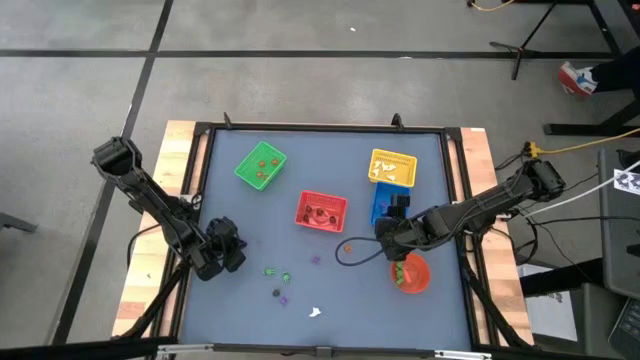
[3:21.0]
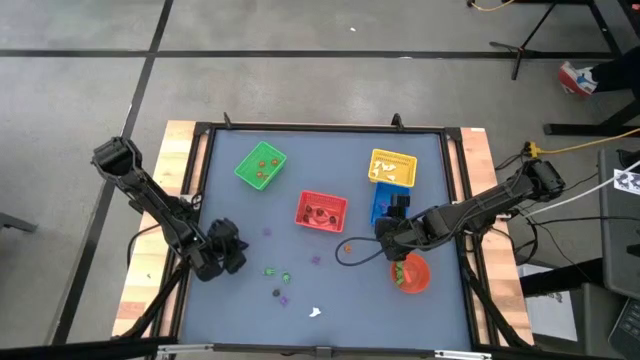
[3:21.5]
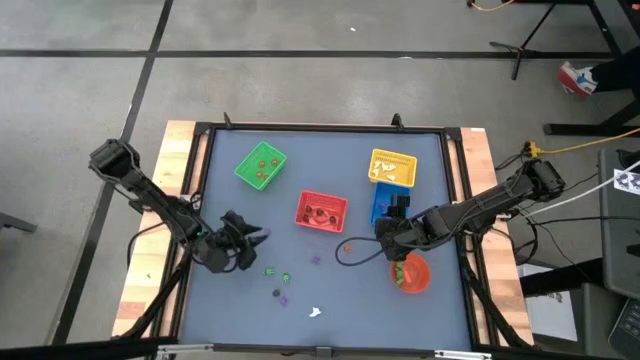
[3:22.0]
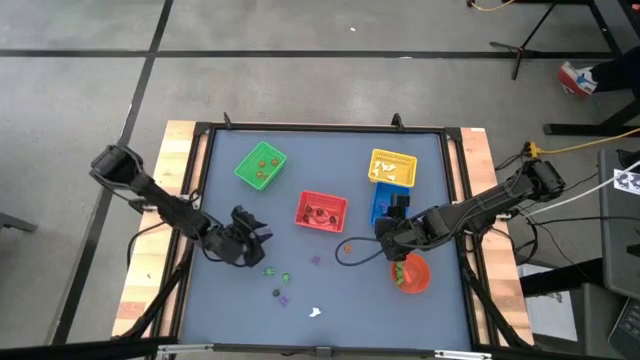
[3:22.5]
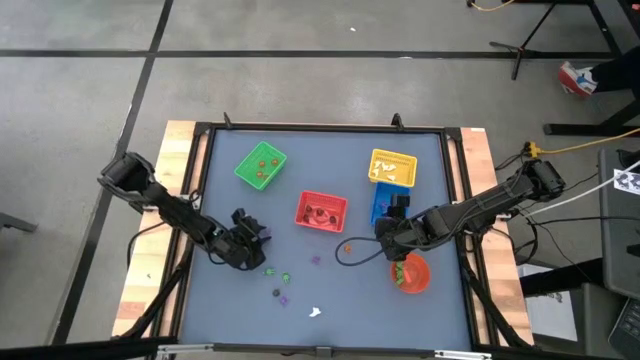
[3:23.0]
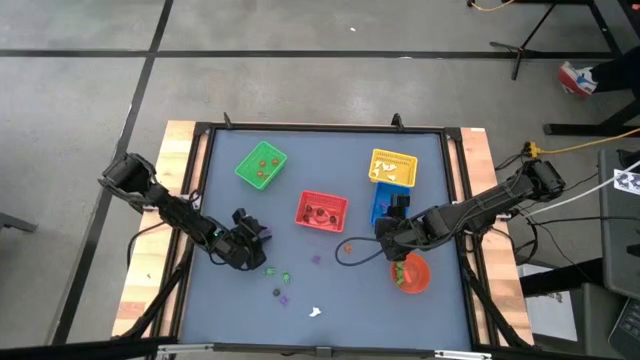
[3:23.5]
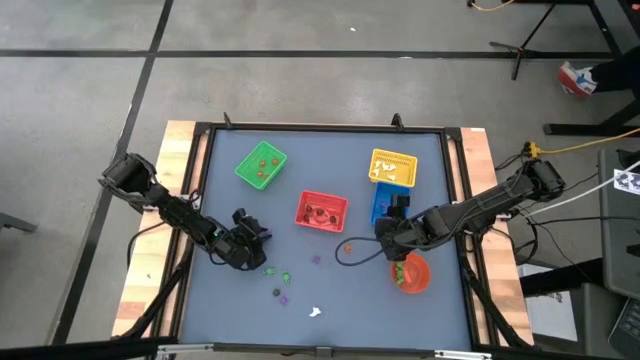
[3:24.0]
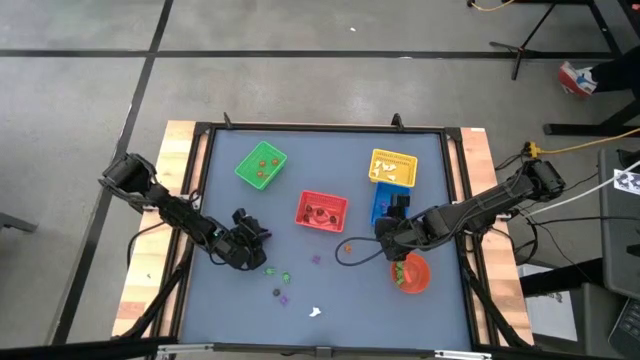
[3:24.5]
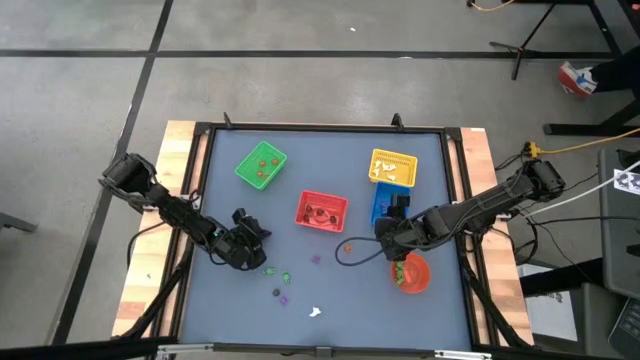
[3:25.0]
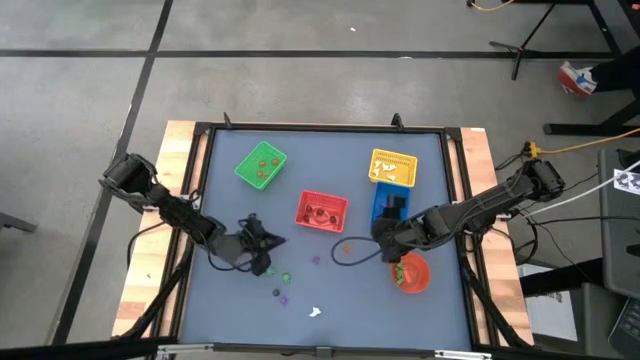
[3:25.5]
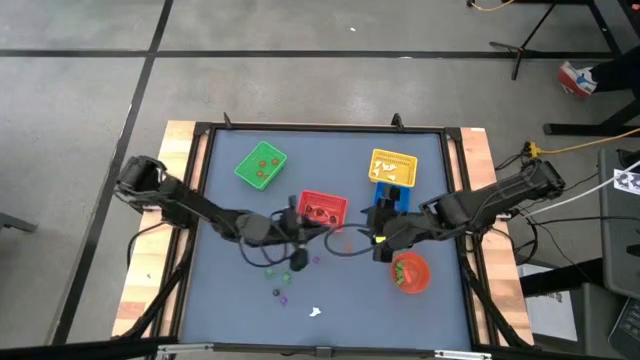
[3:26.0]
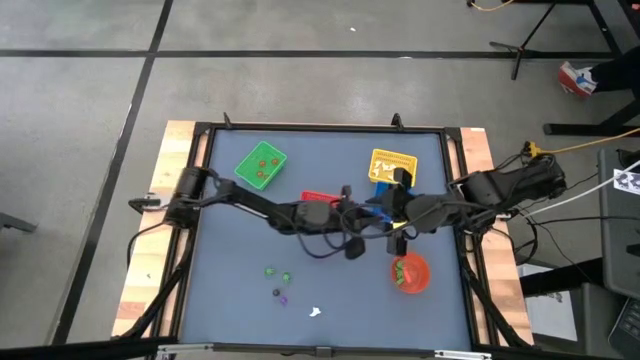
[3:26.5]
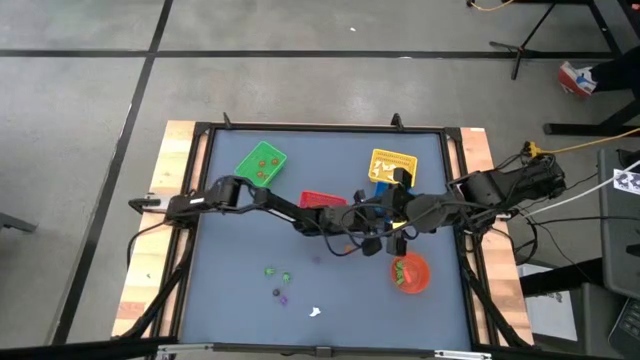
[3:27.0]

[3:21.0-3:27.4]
Task: Sort Halloween decoration
Put the violet spider toy into the blue bin

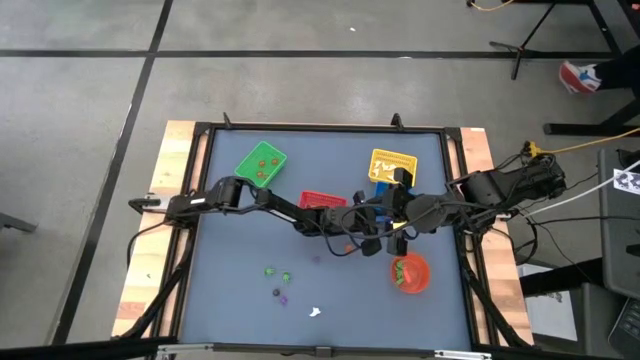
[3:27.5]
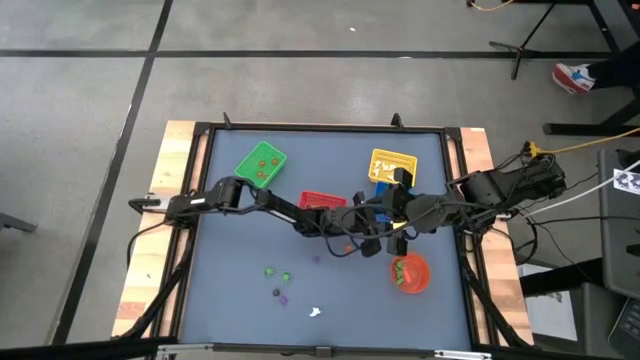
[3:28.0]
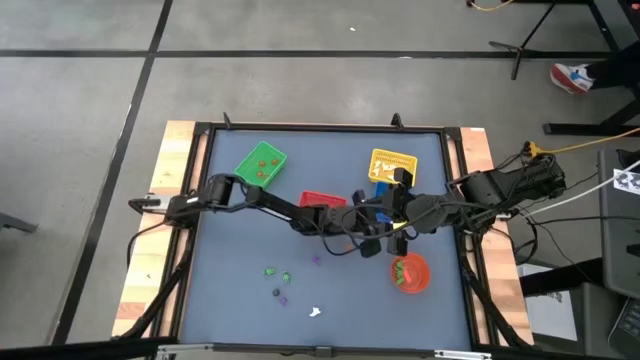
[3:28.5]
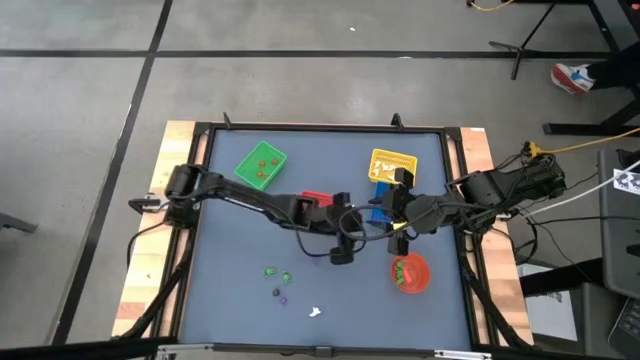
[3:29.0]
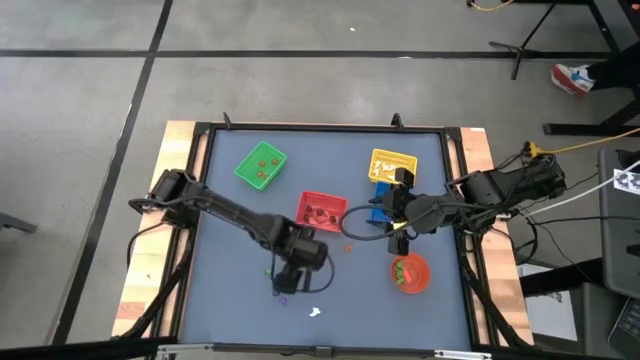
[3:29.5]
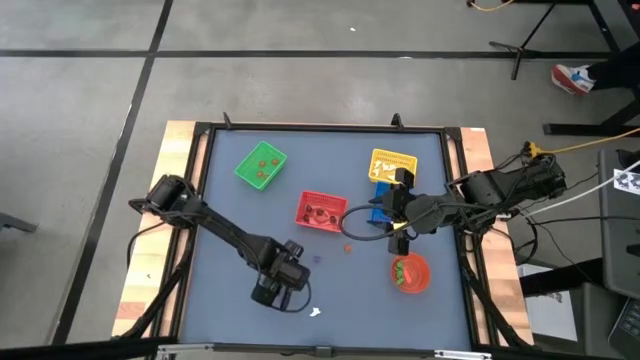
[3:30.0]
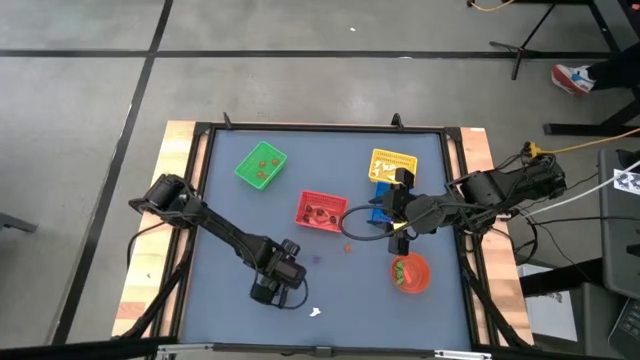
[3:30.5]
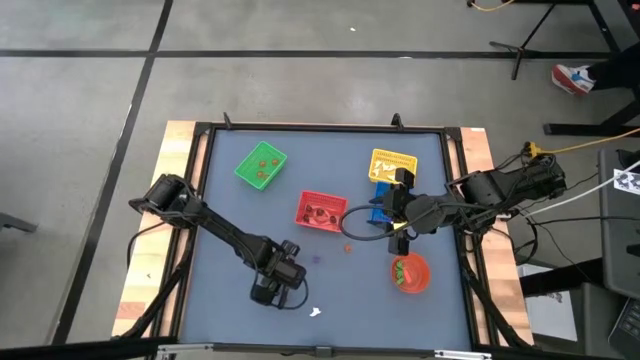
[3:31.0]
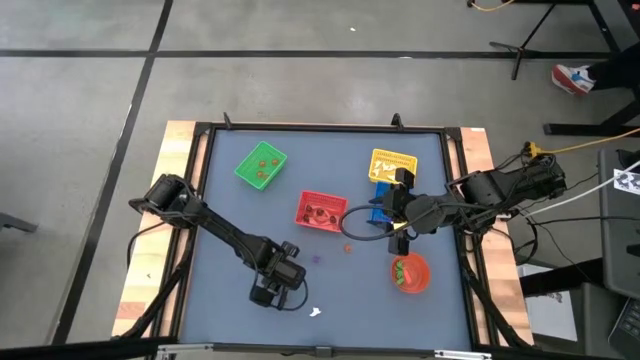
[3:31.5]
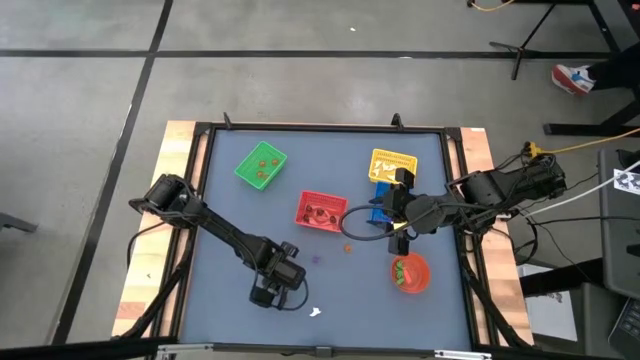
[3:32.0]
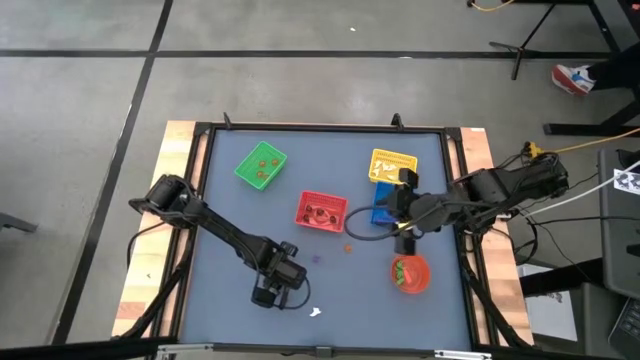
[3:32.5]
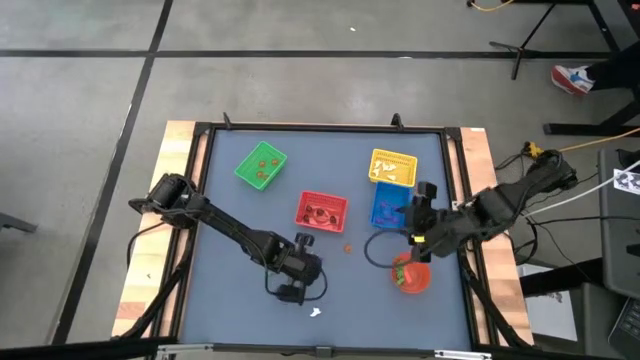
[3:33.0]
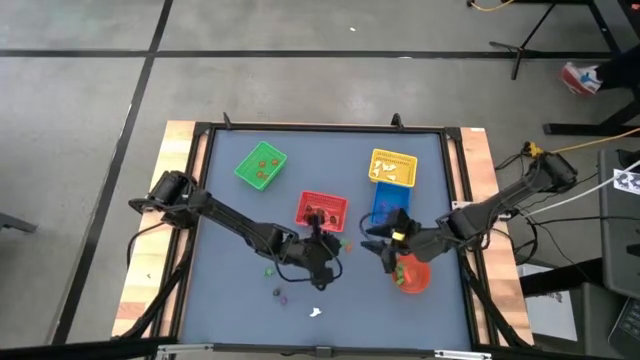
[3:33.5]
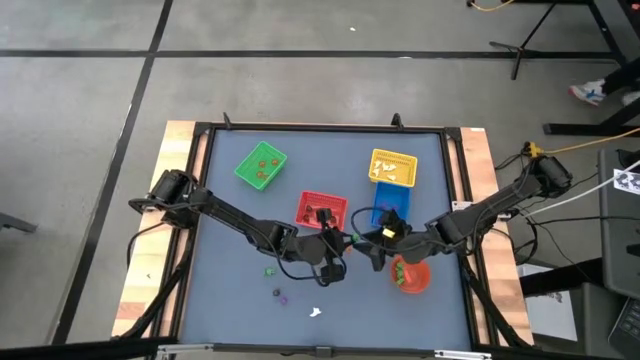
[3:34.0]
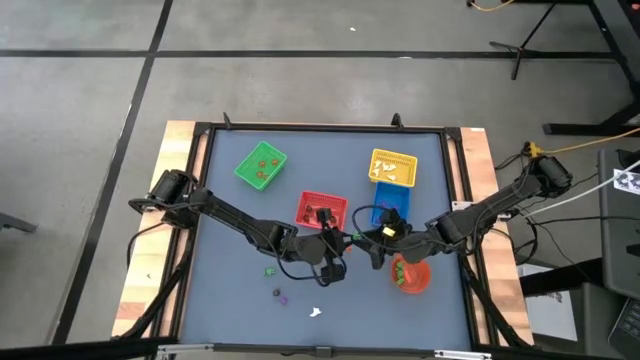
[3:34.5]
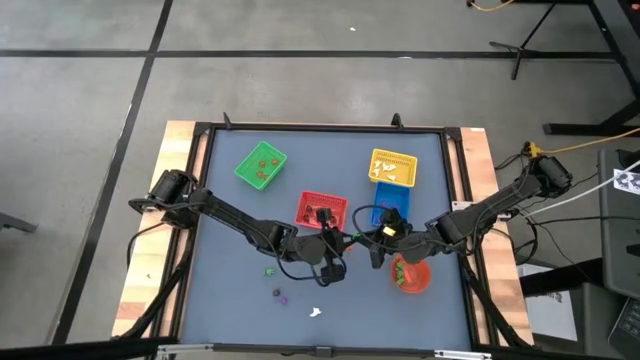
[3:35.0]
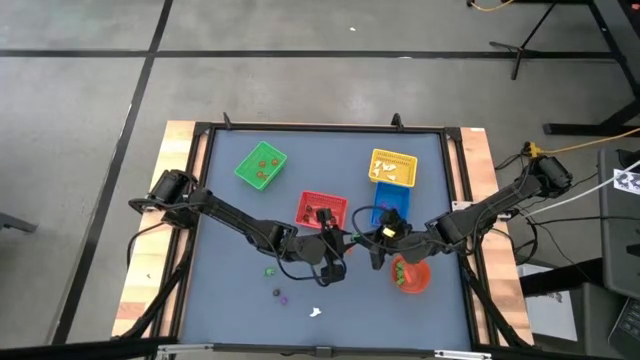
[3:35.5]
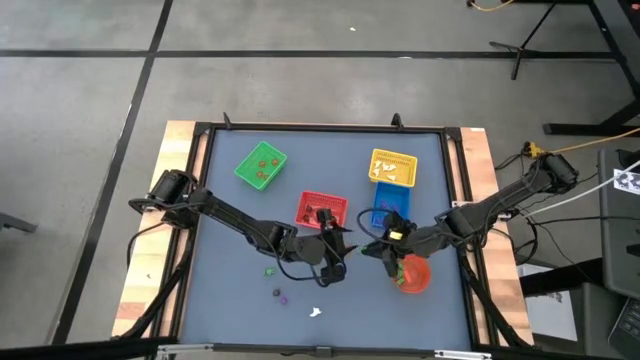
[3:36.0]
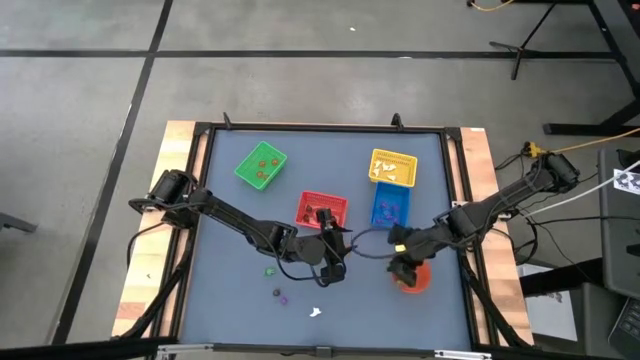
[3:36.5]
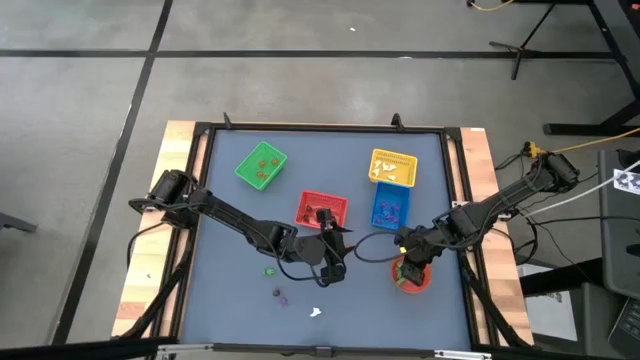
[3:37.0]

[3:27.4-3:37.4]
Put the green skeleton toy into the orange bin

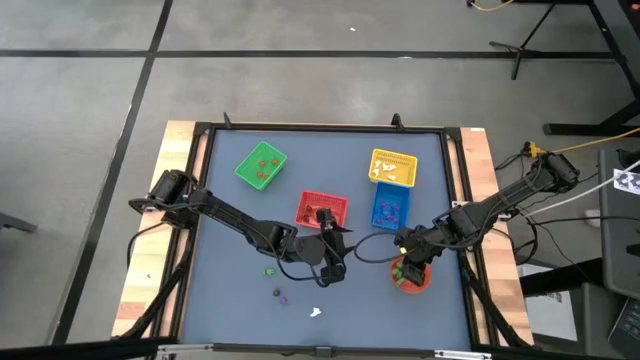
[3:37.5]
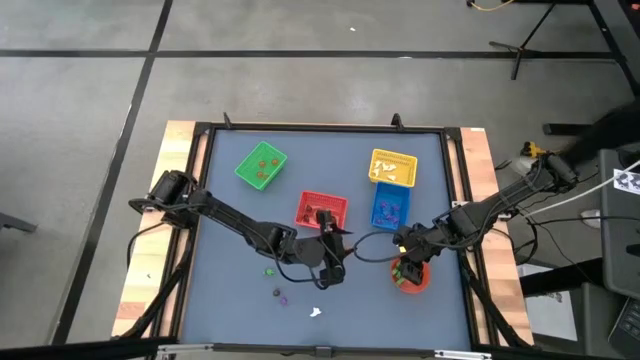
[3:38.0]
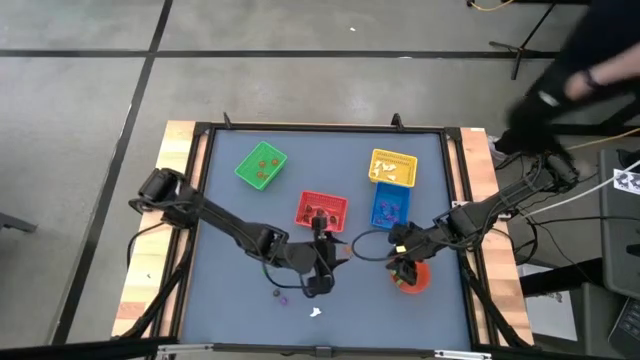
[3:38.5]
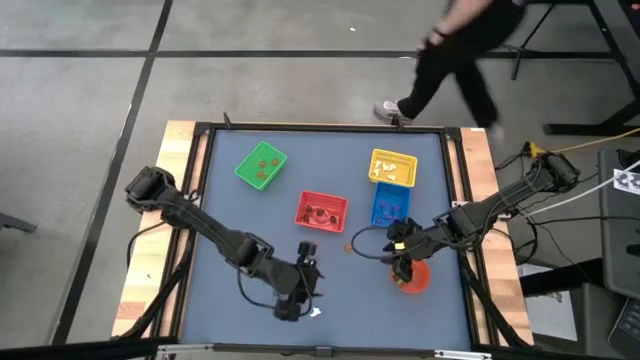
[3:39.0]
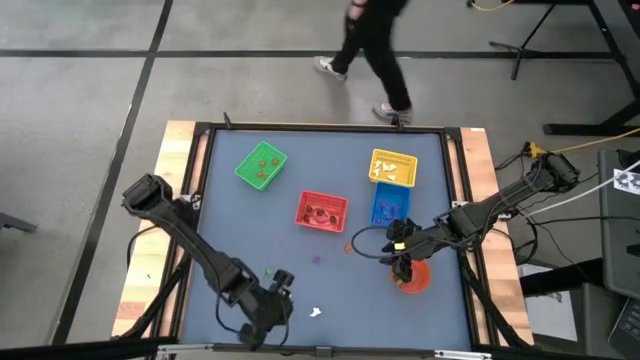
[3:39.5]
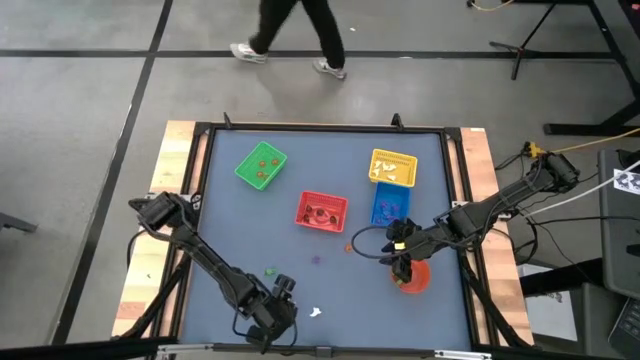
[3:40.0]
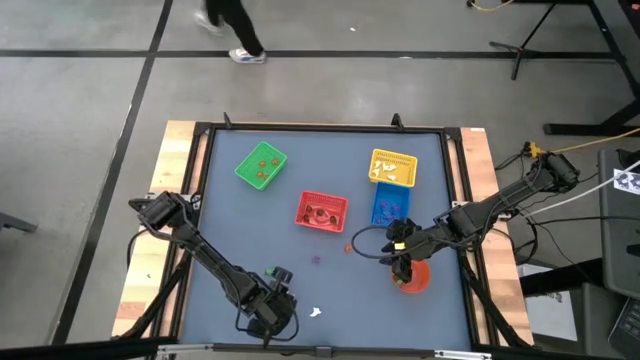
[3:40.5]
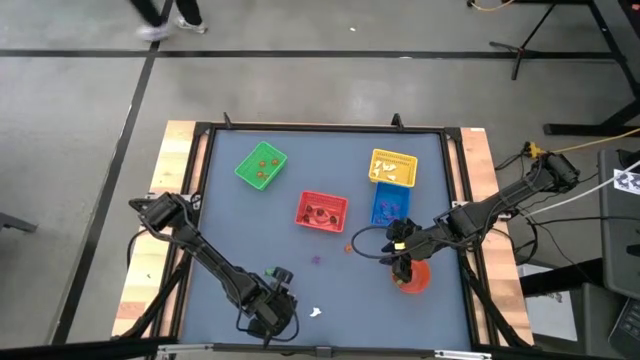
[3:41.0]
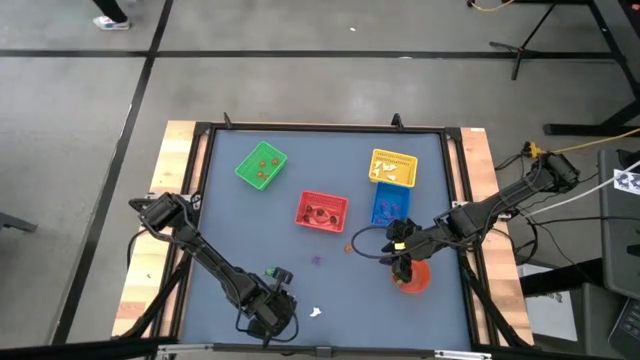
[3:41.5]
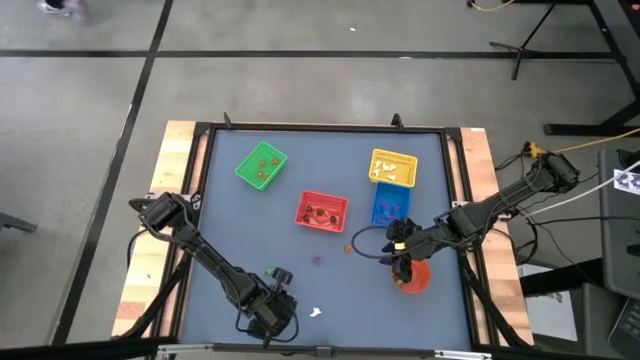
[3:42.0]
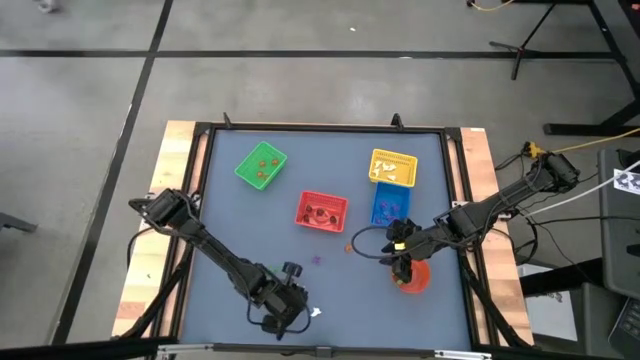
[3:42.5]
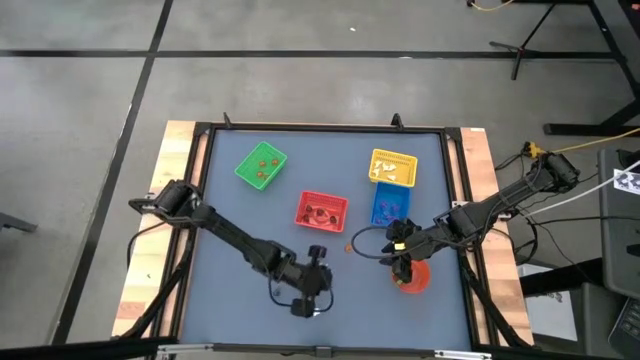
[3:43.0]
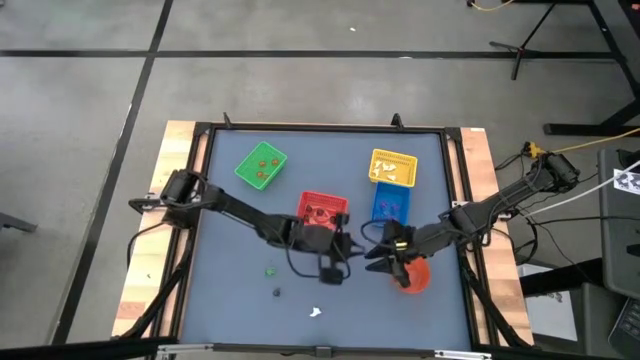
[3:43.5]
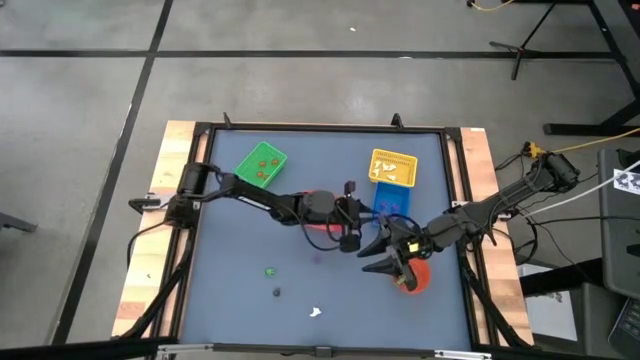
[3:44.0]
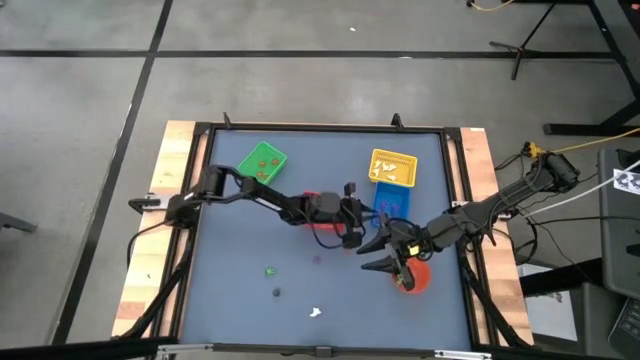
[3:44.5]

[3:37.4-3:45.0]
Put the purple spider toy into the blue bin
